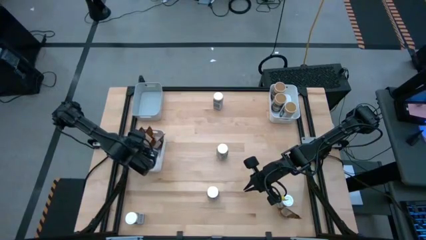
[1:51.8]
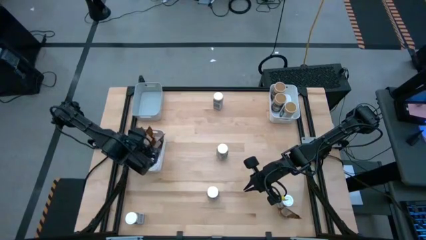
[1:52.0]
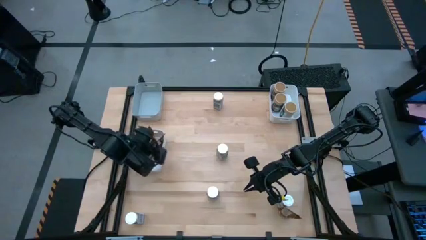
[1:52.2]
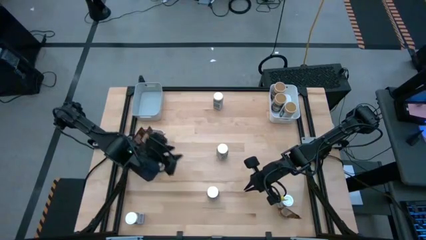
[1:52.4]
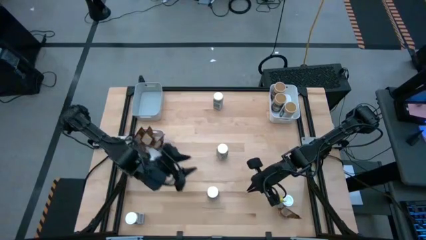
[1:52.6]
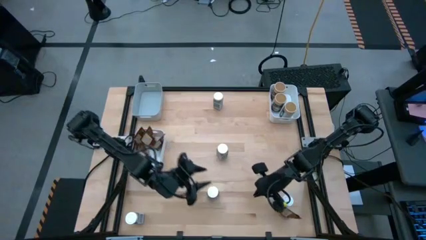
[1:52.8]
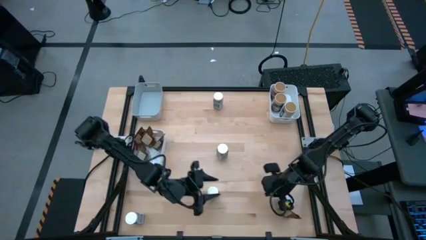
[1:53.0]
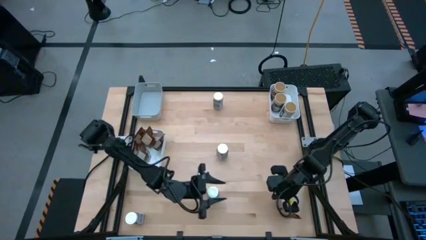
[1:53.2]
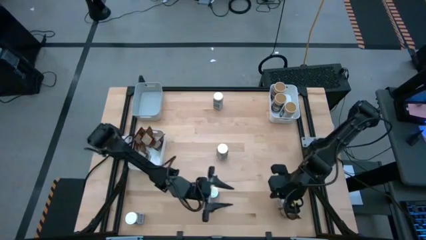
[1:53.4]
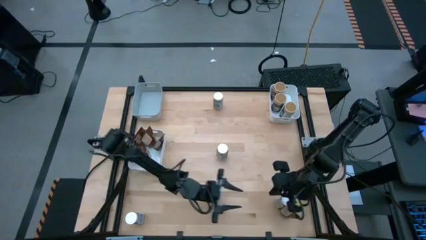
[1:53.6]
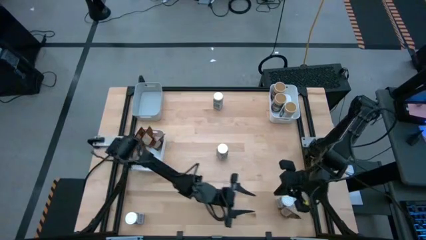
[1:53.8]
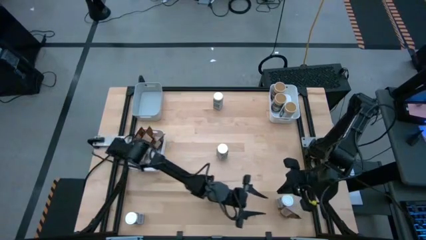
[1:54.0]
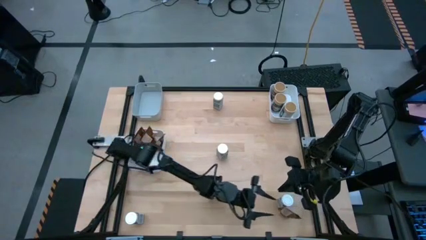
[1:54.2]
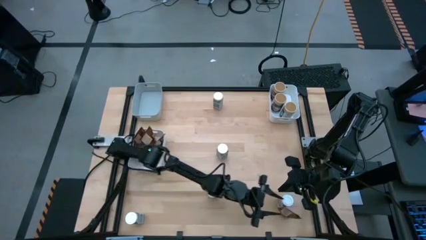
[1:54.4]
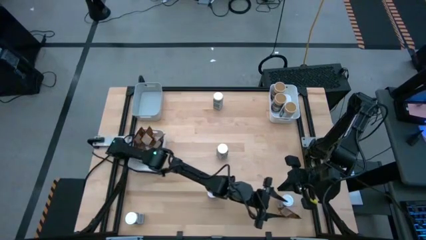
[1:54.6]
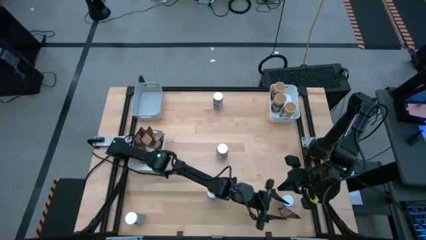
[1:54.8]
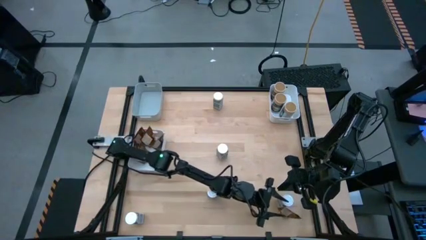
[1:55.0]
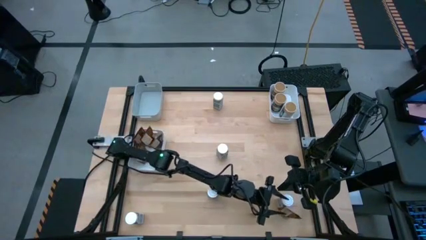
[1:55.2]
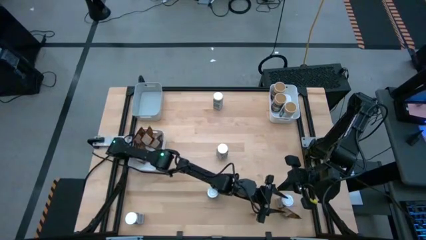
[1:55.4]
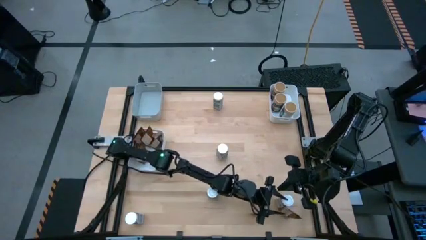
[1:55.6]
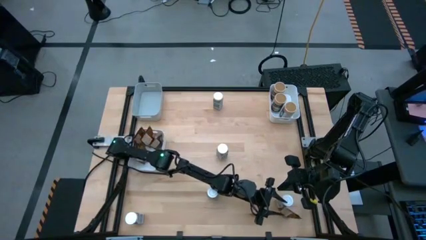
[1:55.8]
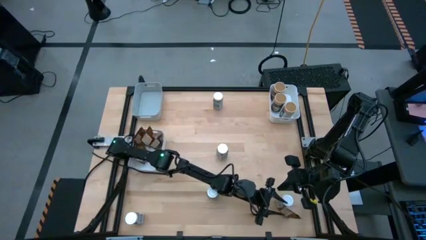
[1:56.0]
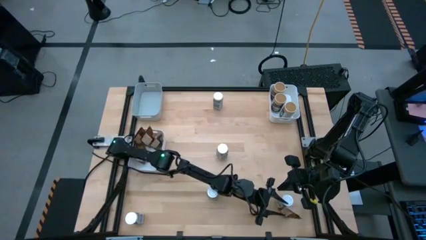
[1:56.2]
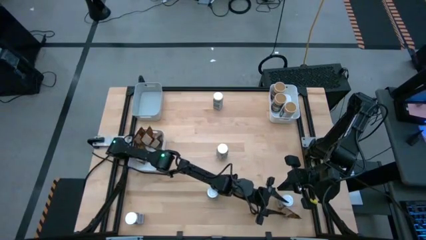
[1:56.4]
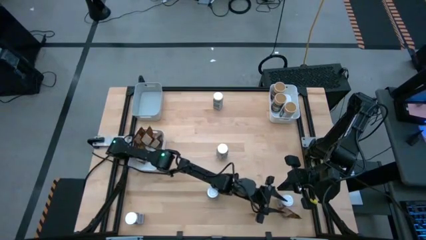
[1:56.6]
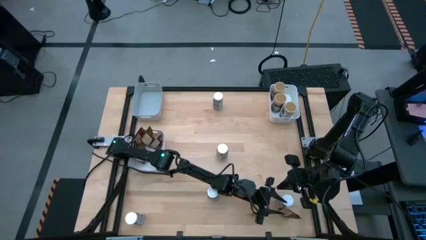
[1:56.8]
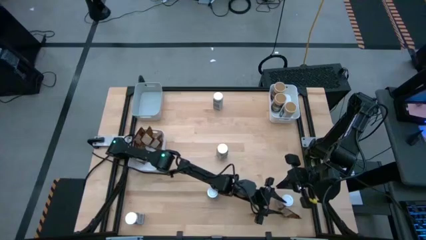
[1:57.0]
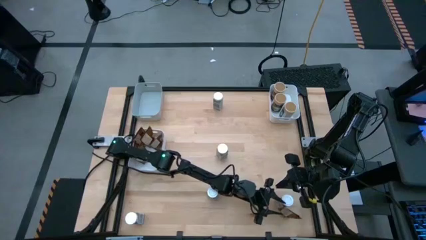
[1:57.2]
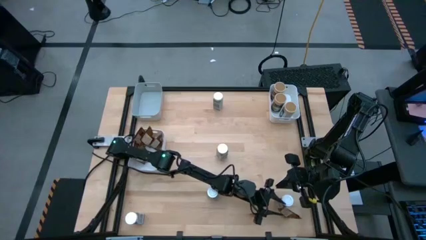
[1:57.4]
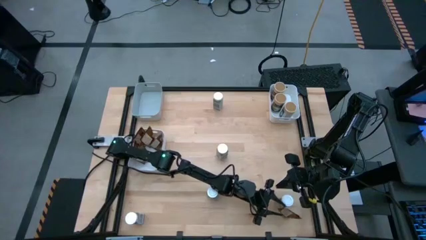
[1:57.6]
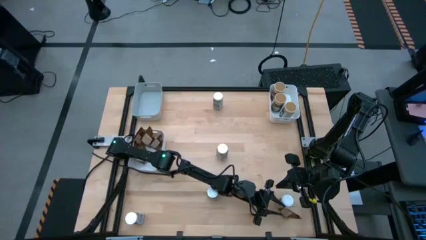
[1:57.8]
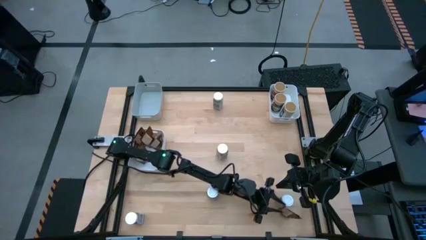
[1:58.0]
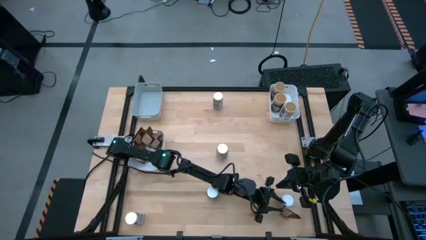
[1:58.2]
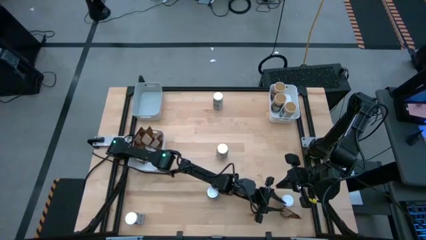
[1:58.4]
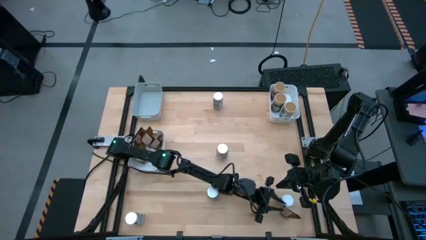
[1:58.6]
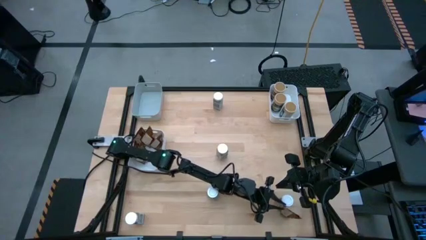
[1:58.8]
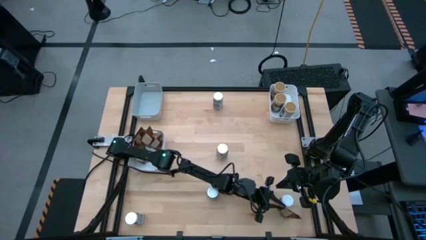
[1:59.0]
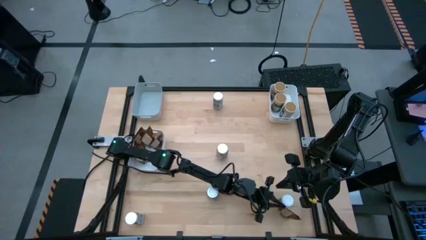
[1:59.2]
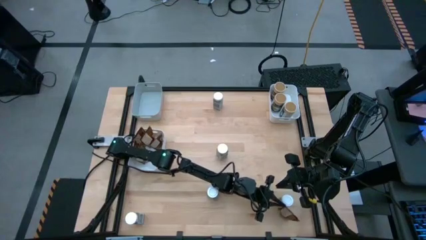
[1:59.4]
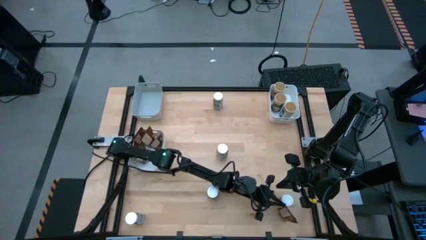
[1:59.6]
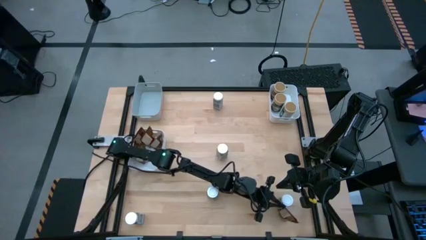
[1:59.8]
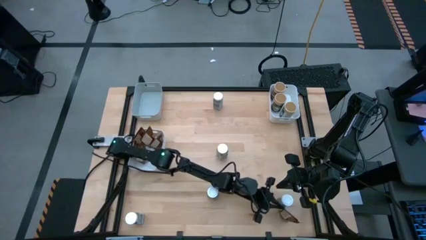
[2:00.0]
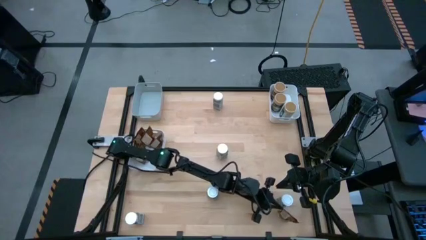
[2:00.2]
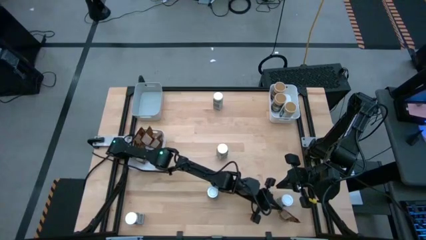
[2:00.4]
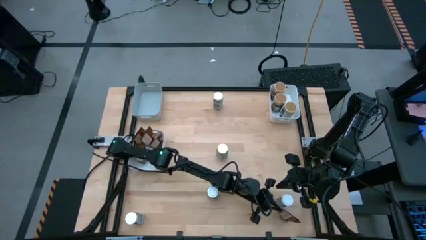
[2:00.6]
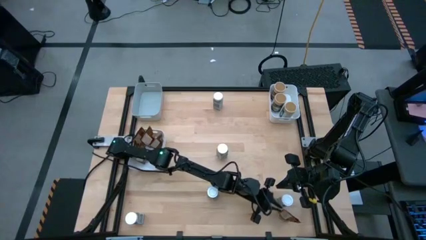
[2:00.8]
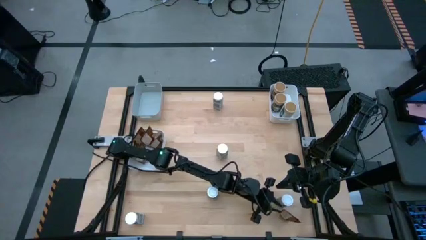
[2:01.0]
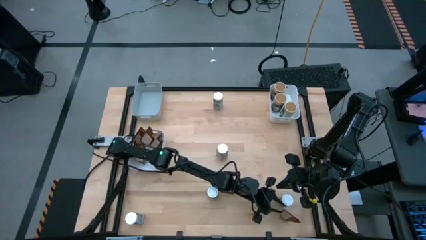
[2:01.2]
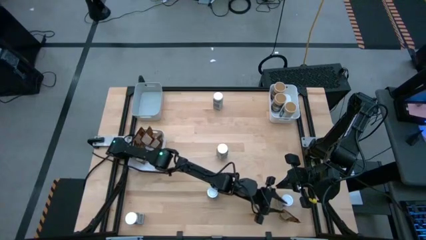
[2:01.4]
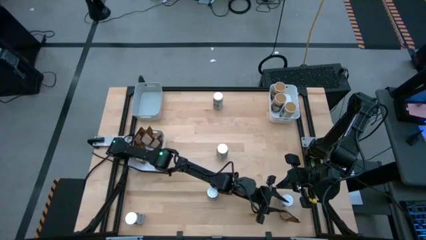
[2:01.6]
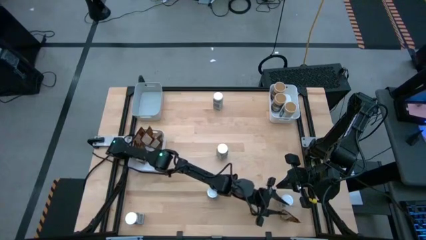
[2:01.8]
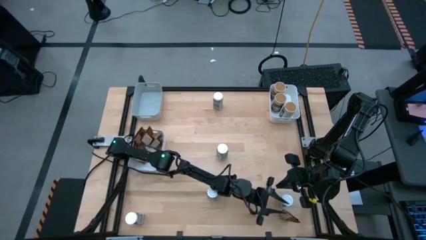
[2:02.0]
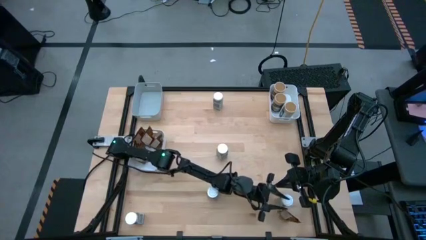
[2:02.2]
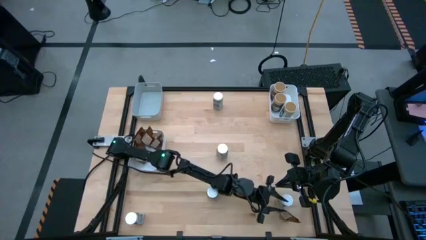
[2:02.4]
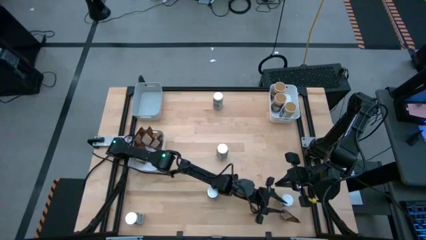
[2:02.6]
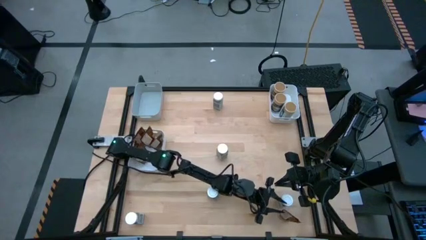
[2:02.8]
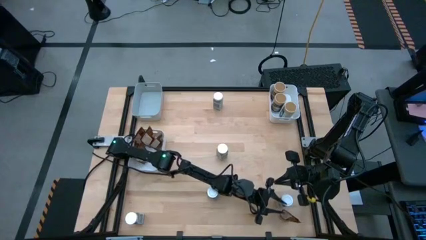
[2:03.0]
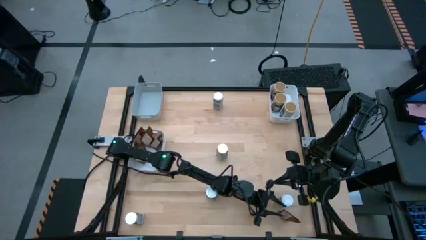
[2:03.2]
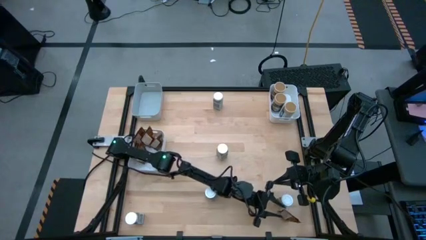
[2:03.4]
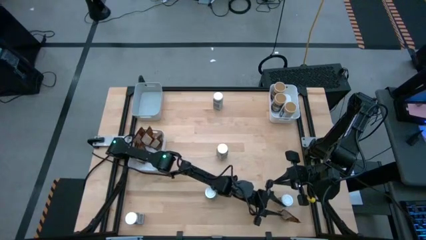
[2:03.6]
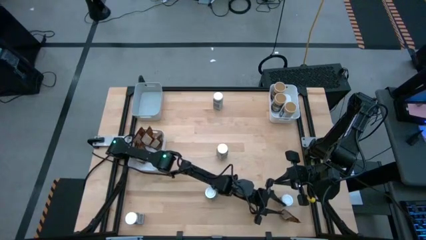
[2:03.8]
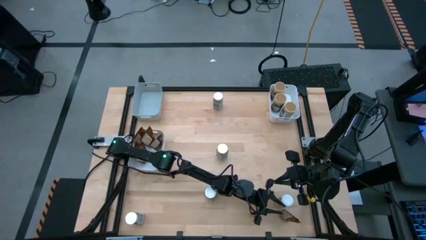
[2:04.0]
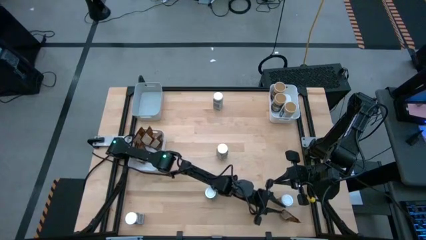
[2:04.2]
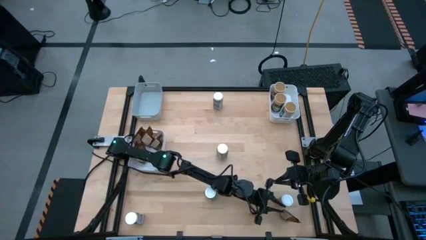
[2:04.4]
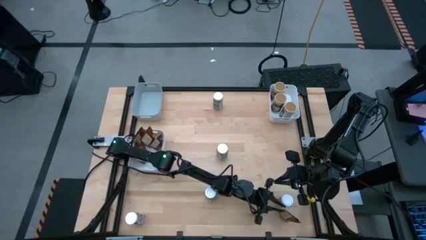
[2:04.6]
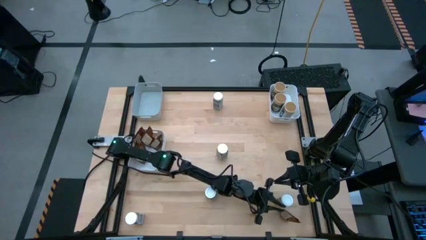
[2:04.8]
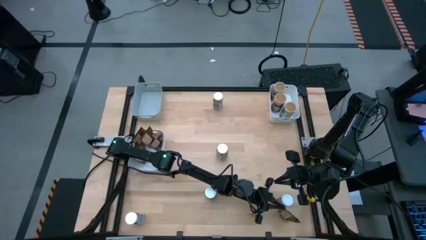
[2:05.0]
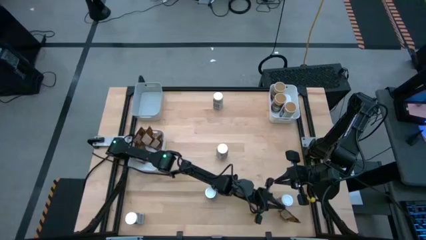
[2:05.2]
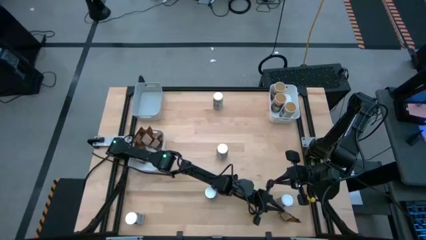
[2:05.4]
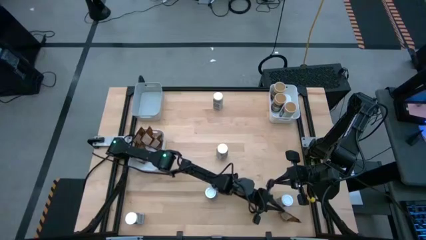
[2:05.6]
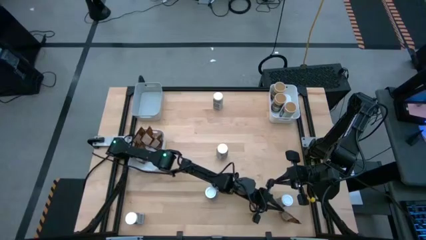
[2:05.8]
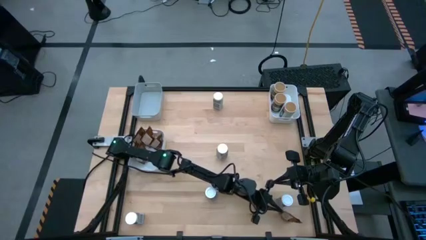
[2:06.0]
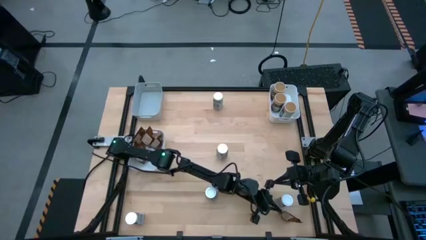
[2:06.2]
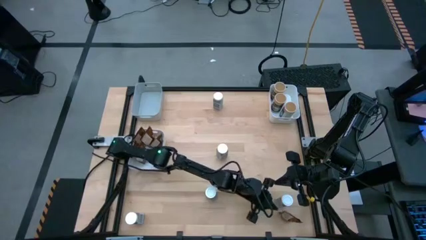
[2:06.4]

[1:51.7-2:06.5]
Task: Sort spices by type
Put the orange seasoning pack into the left white bin
